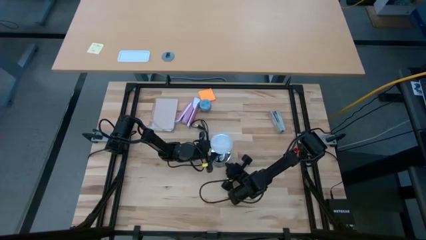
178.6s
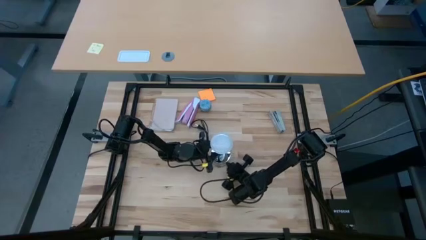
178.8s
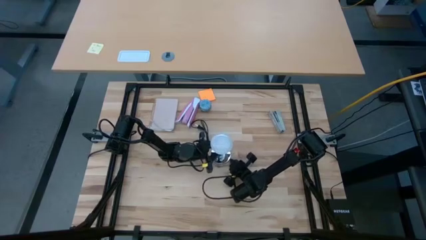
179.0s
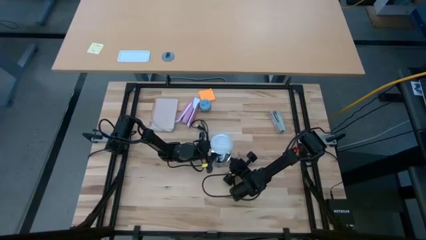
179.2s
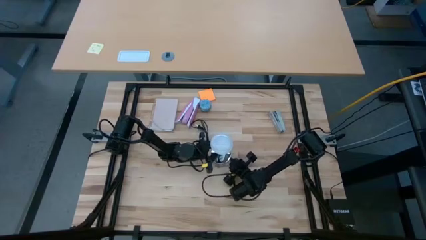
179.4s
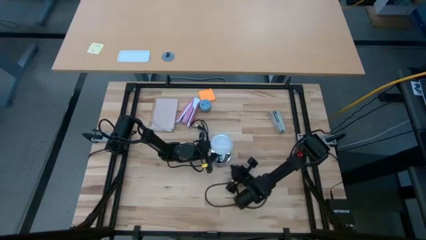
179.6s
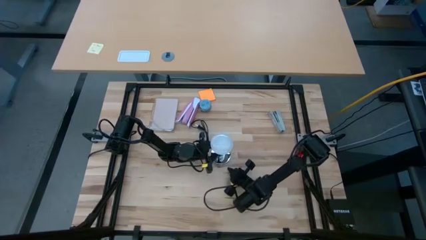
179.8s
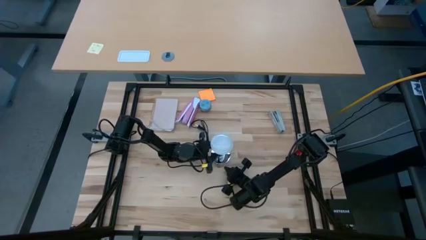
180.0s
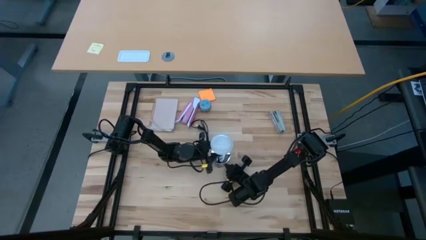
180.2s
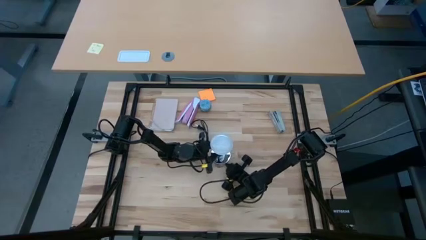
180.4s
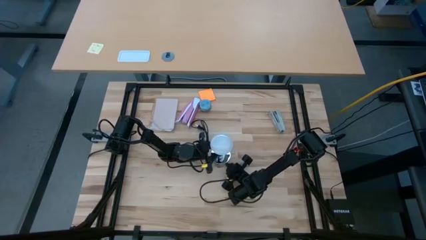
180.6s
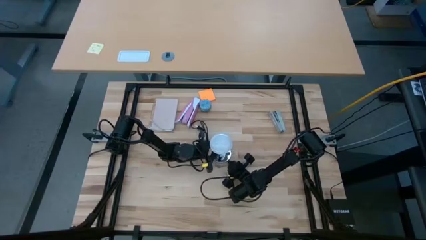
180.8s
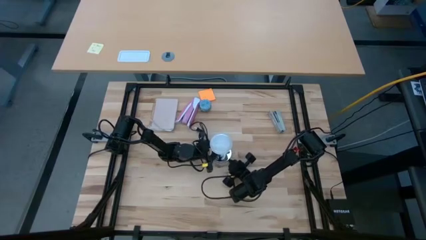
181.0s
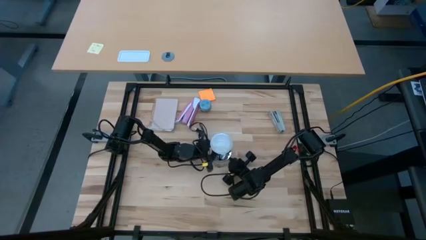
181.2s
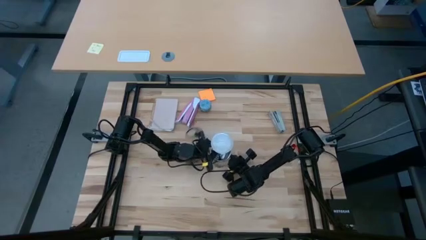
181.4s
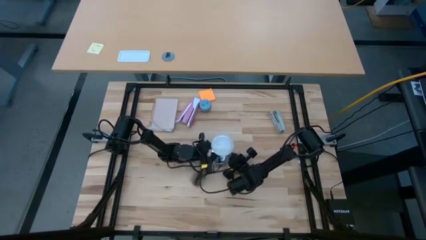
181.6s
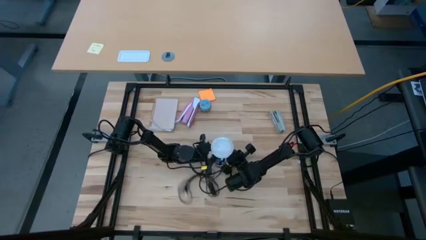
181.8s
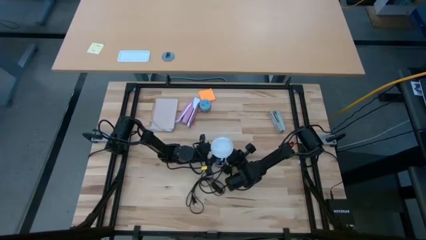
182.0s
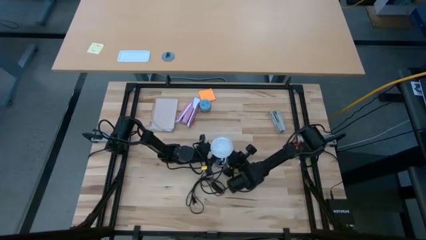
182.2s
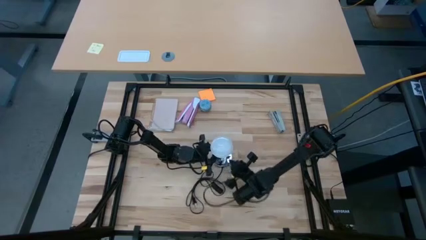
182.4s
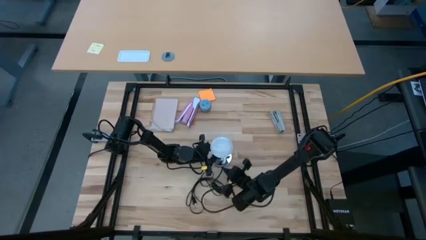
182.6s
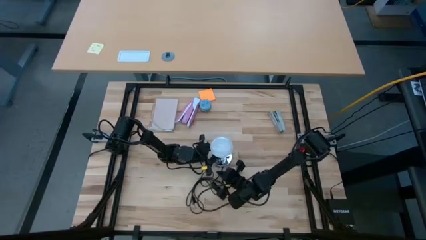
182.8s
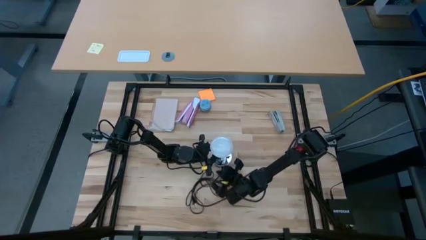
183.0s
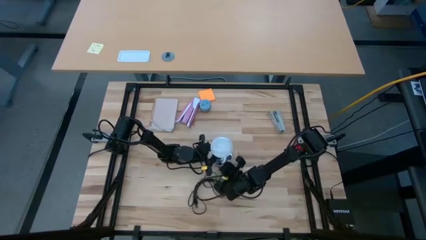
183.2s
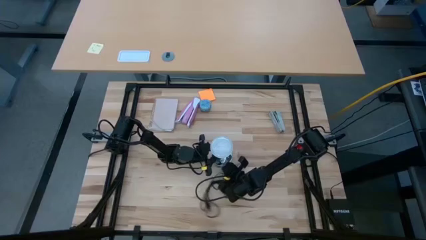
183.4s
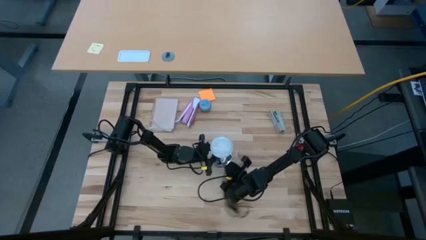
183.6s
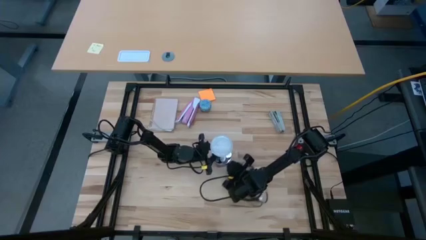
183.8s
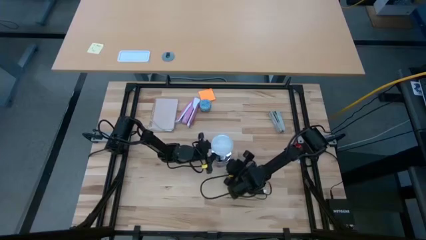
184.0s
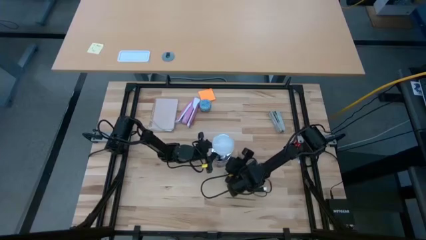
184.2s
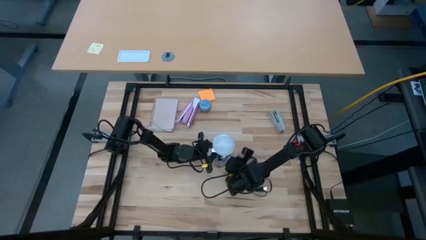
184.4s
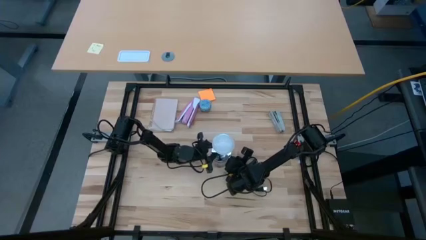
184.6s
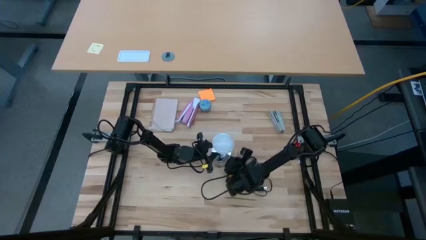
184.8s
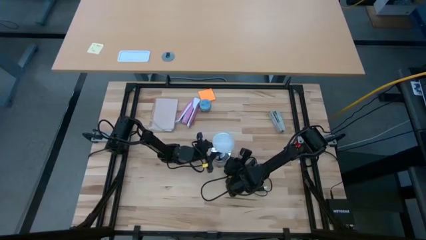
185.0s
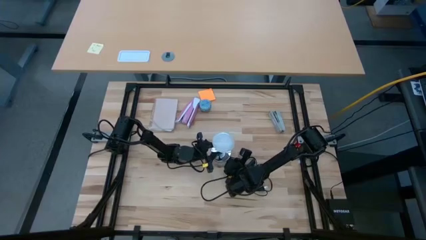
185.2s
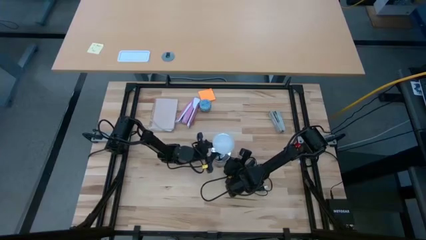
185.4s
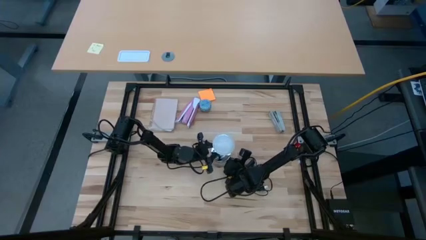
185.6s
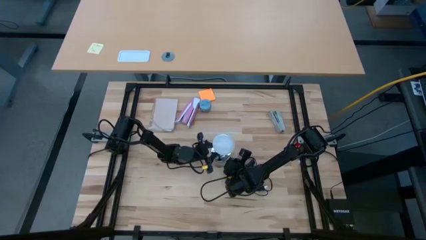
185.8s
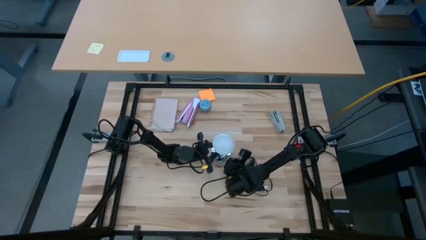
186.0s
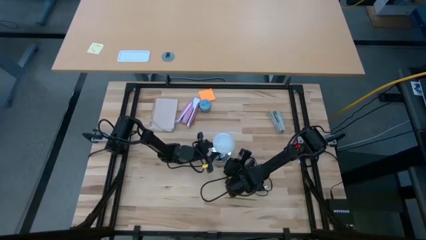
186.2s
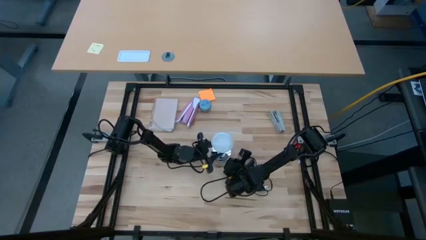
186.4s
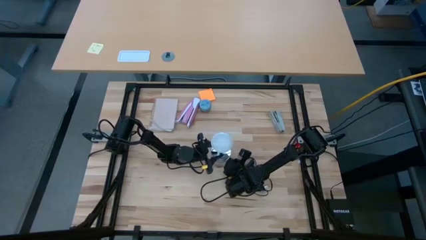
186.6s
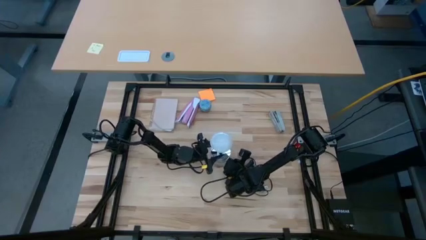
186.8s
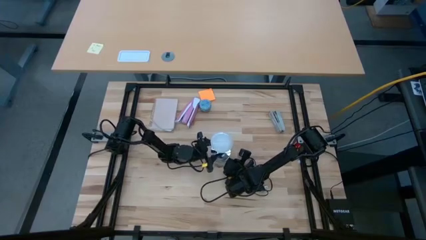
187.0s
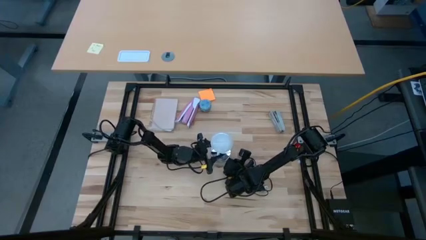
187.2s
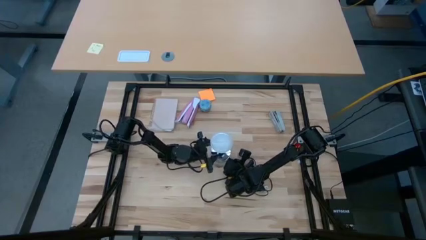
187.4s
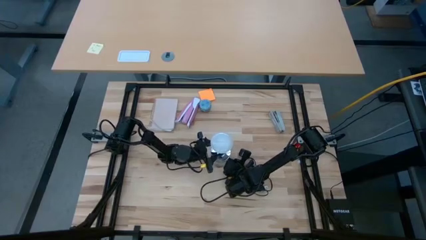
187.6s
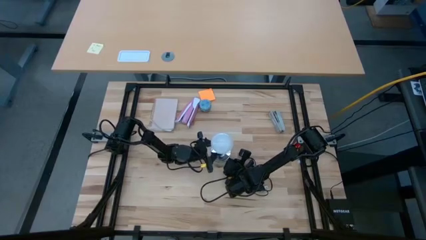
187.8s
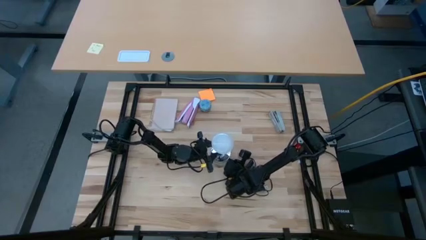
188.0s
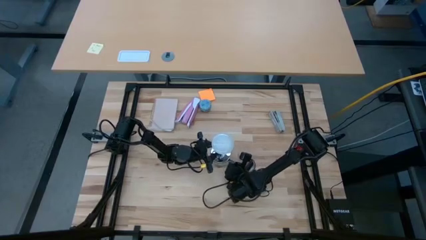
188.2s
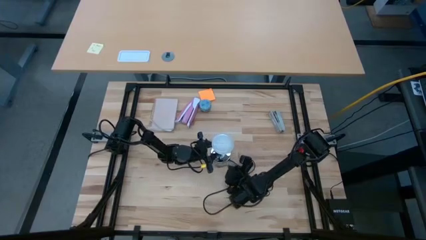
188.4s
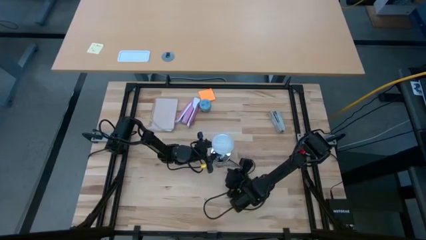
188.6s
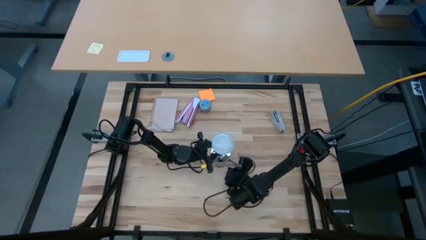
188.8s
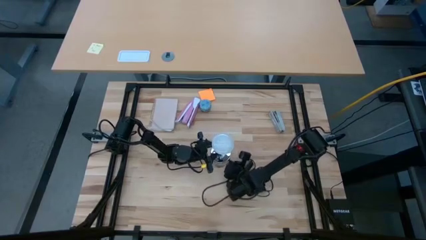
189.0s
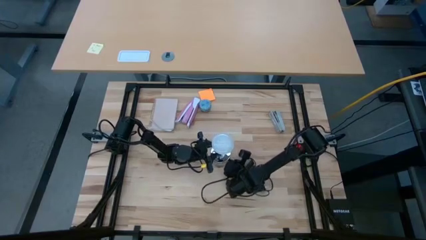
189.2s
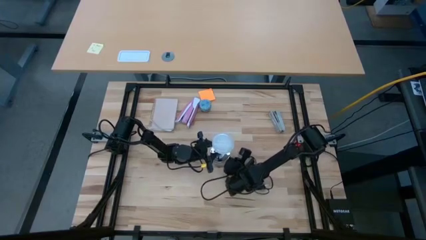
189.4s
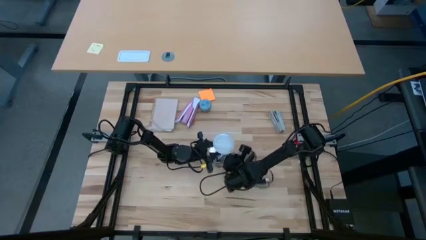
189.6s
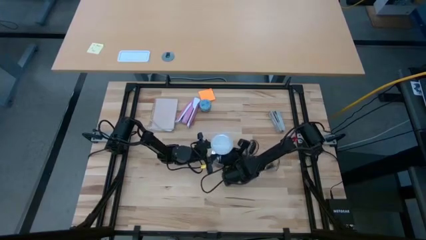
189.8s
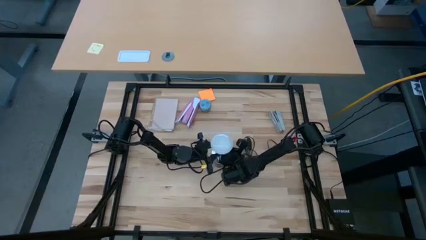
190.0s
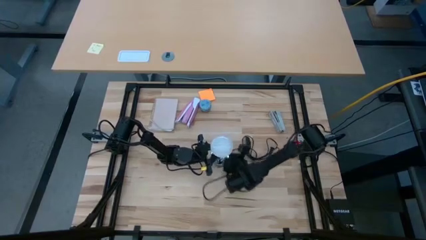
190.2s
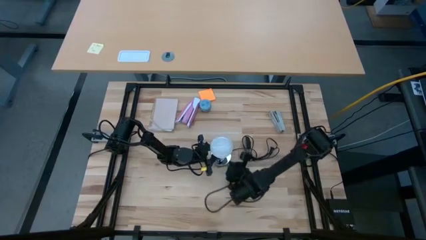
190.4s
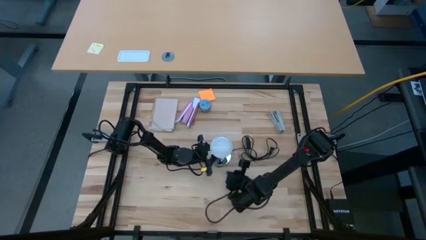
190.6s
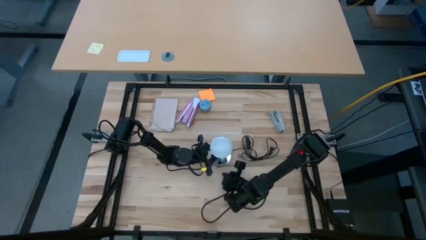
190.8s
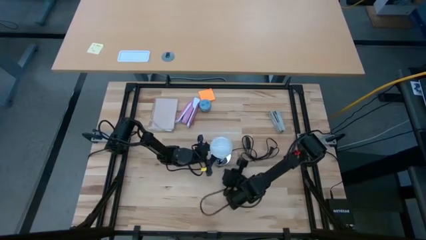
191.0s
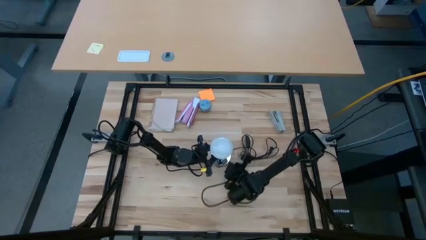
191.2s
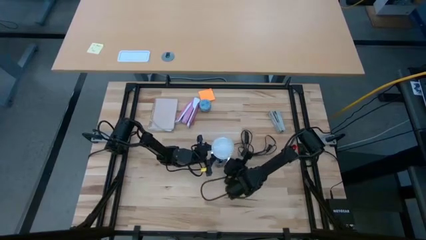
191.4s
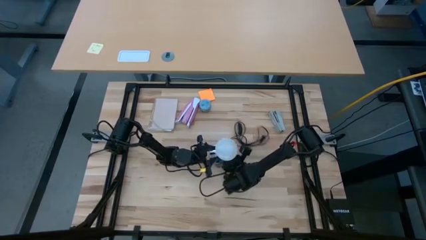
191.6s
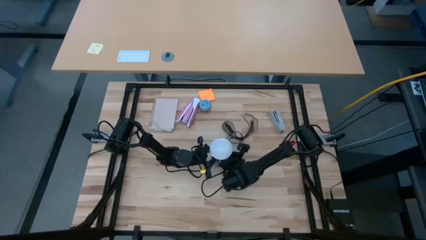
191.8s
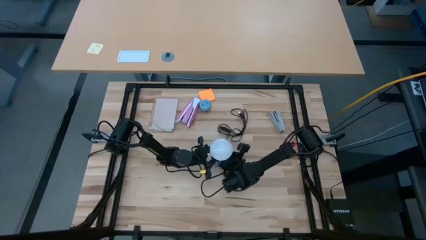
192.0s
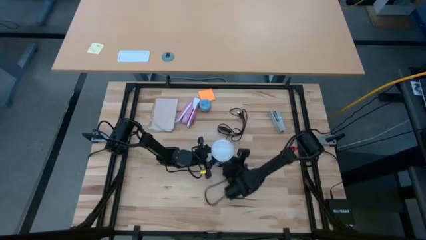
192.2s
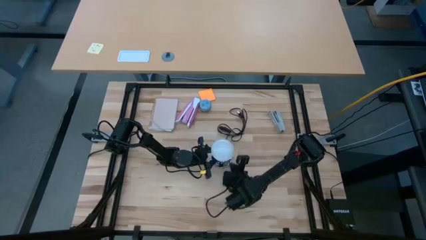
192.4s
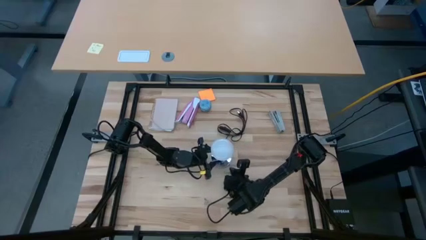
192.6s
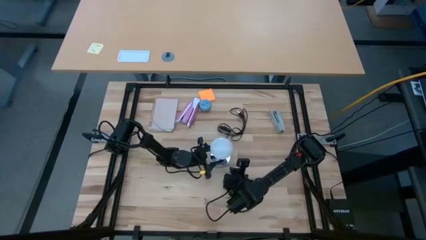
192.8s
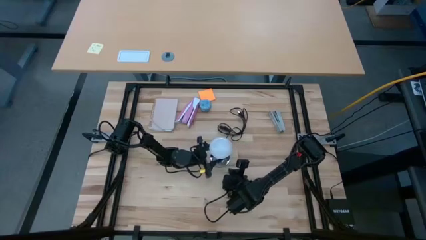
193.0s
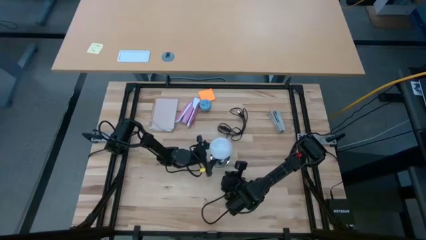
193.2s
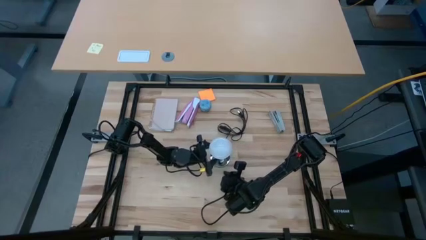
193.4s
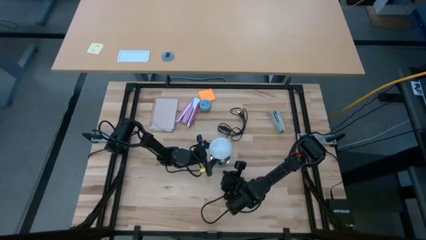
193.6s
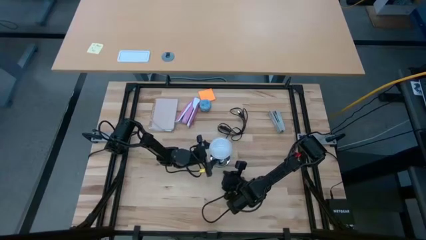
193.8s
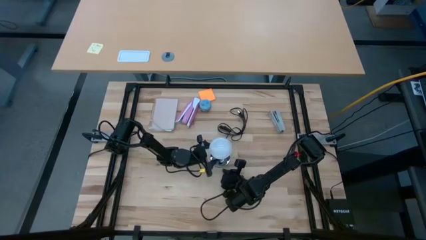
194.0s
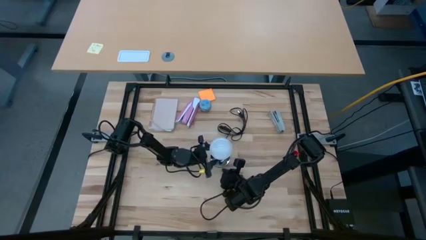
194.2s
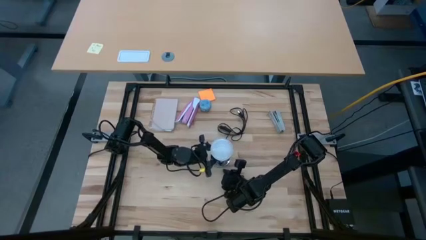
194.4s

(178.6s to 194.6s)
Task: Screw lightbulb
Insert the lightbulb into the lamp
